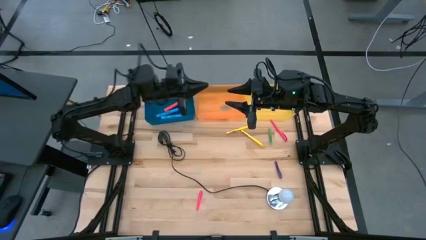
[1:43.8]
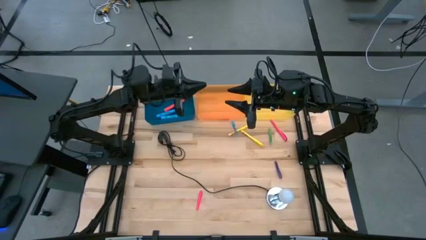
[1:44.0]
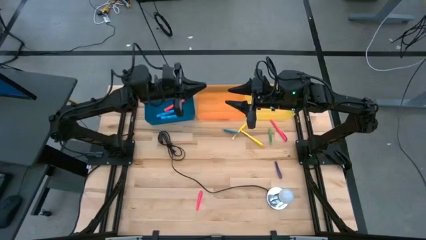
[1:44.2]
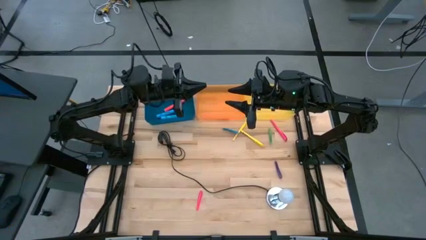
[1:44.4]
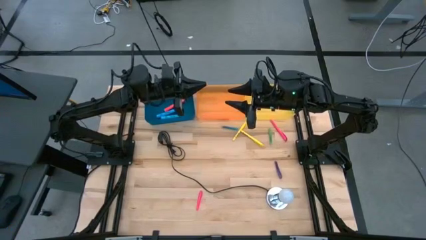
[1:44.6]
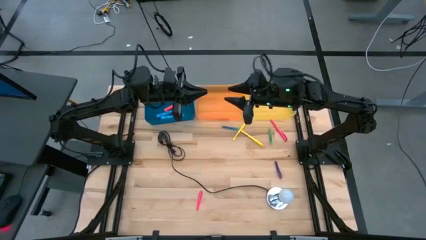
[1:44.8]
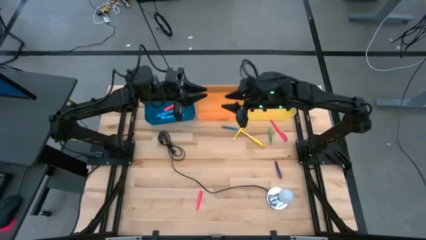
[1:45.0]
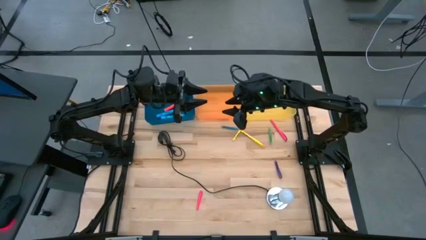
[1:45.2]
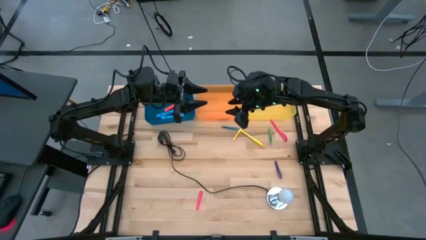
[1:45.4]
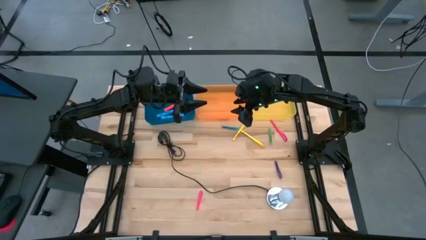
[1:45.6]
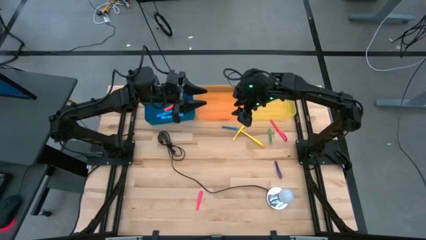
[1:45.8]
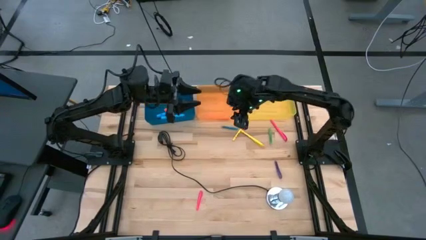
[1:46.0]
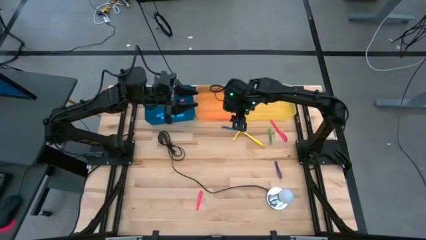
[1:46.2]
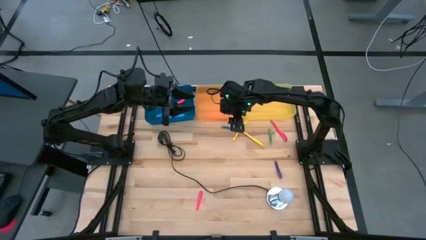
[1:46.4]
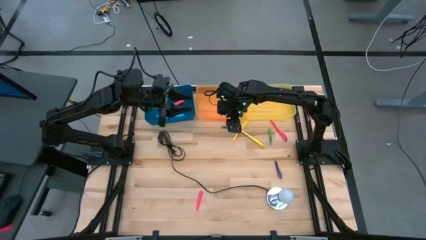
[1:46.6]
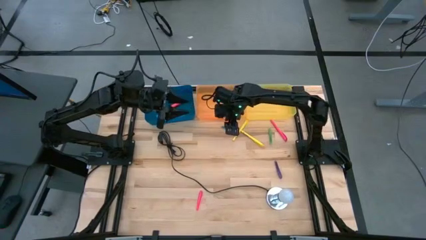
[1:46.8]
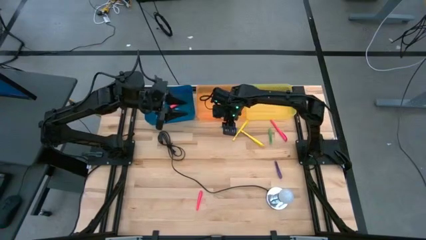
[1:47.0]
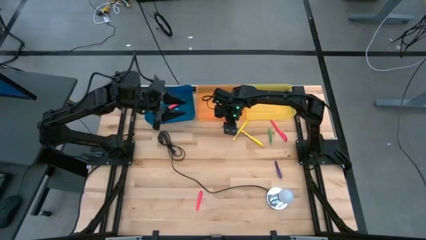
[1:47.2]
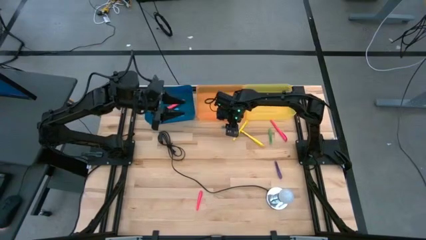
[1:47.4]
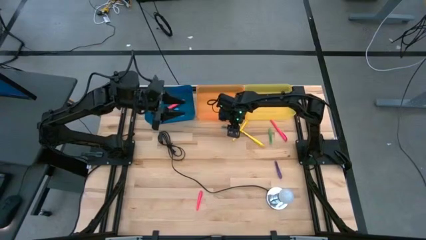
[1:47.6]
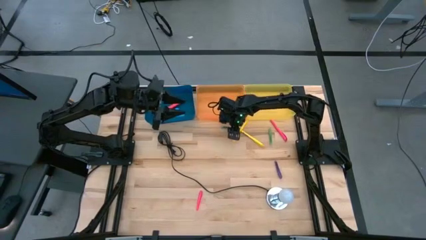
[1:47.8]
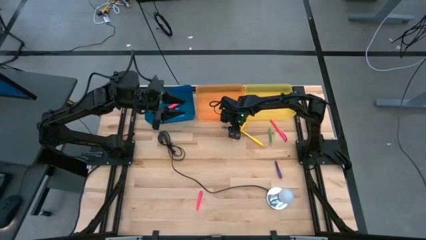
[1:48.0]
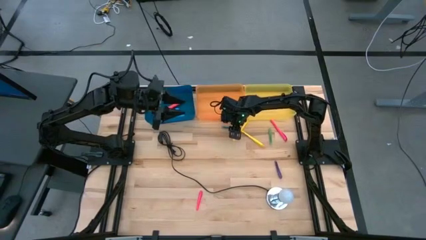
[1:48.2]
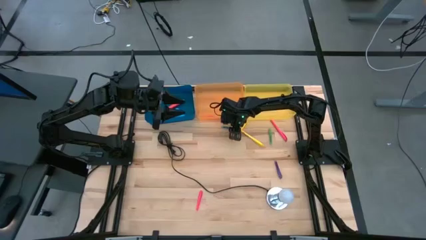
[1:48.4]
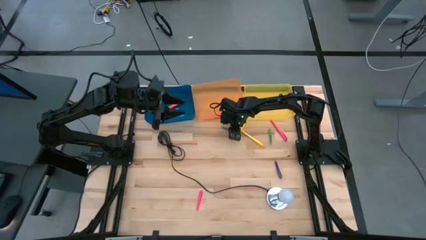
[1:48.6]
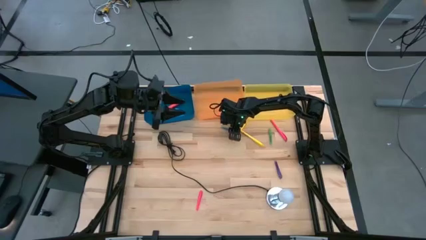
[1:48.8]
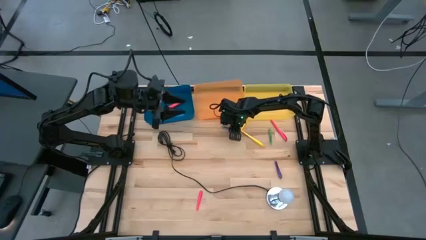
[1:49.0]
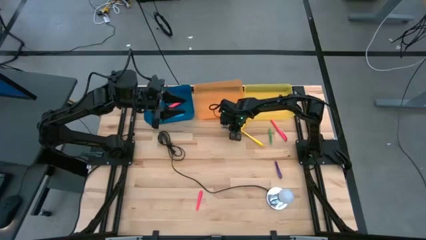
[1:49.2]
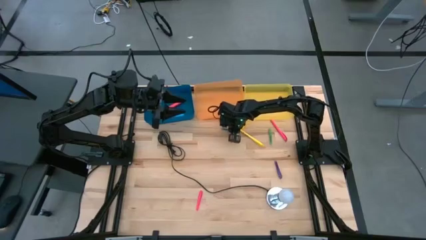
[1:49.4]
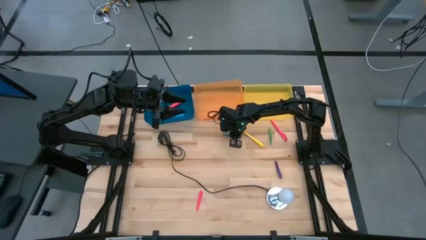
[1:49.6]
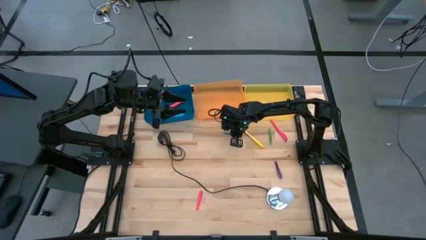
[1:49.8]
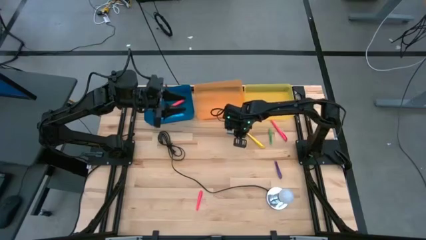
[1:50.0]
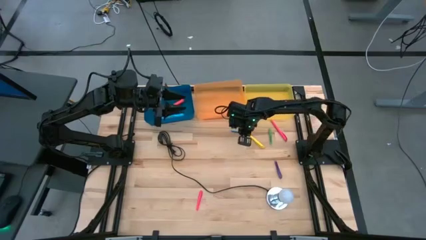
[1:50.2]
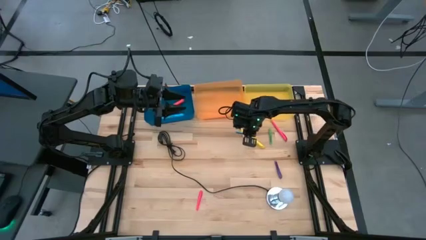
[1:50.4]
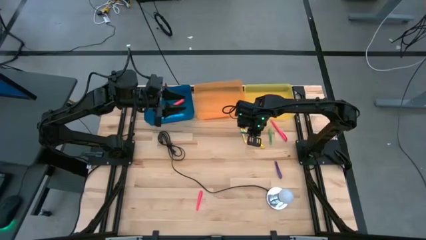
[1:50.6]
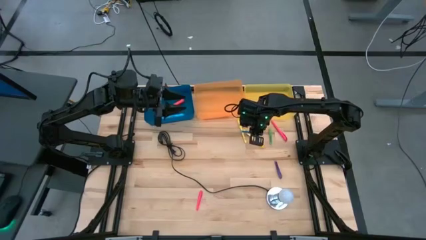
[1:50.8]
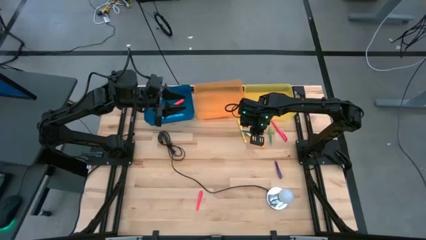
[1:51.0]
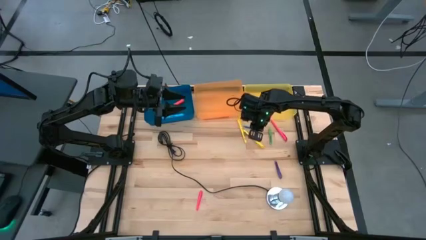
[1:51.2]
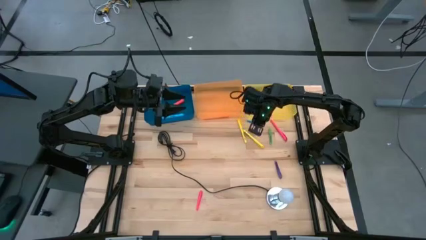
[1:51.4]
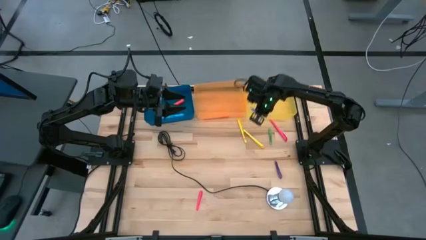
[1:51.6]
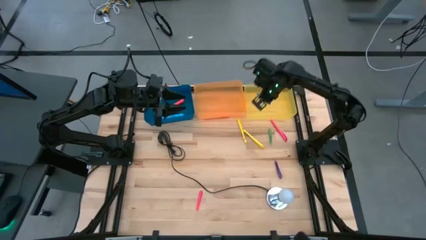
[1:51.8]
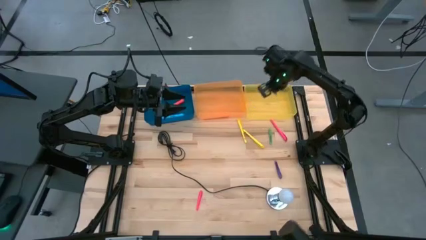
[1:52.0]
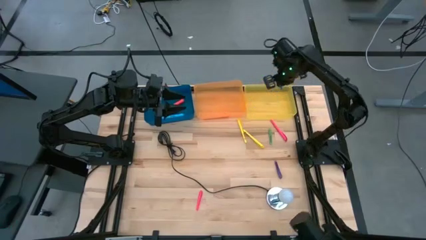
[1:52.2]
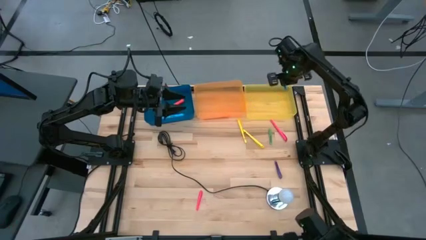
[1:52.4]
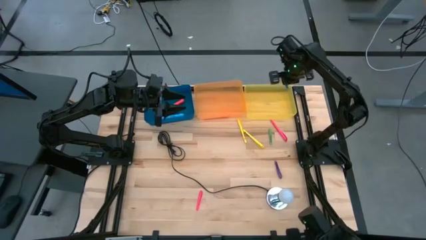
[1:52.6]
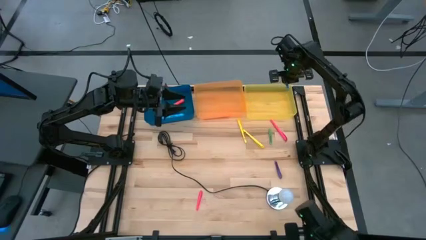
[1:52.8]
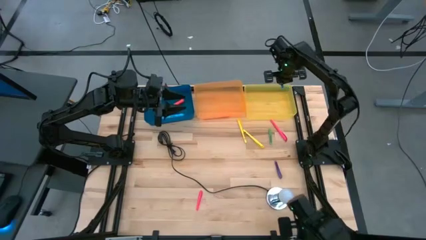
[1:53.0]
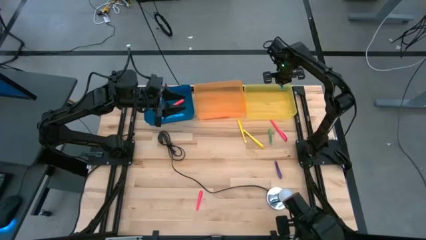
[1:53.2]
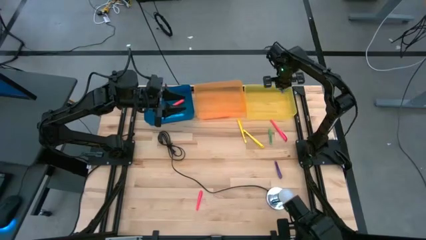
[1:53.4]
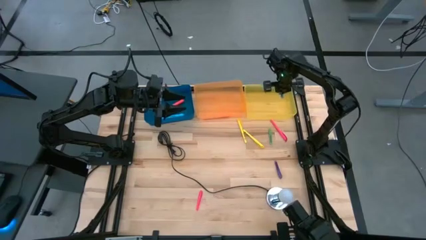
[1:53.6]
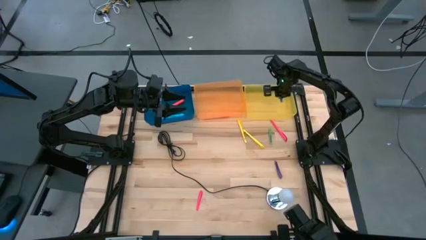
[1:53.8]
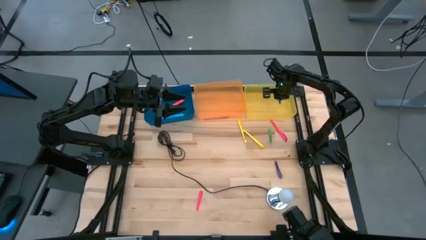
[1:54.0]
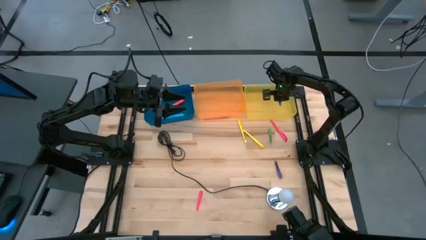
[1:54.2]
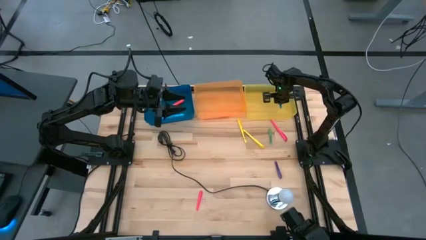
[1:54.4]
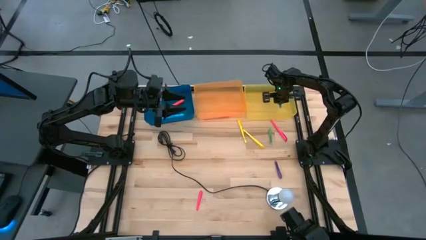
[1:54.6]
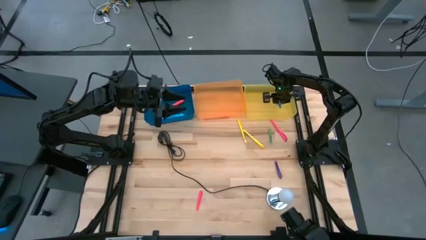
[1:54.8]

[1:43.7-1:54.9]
Task: Pick & Place Markers
Put the small blue pen into the yellow bin

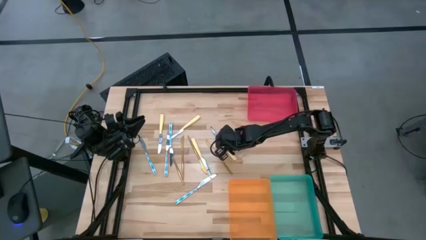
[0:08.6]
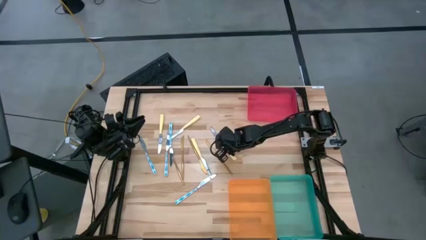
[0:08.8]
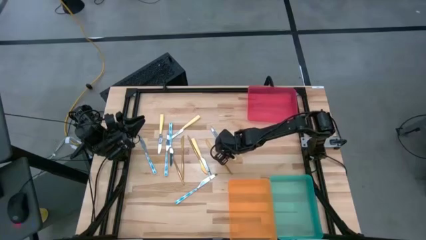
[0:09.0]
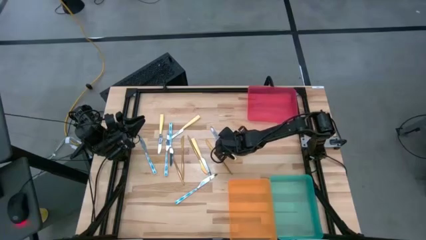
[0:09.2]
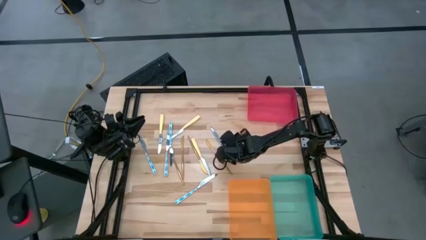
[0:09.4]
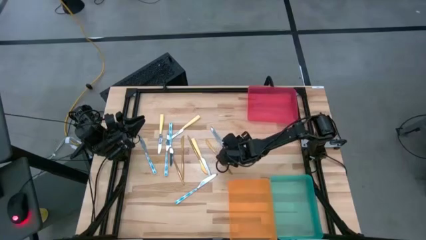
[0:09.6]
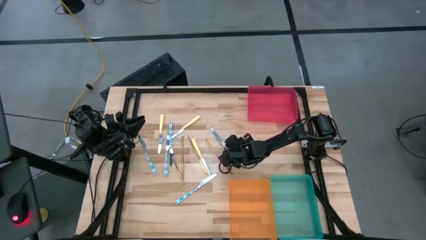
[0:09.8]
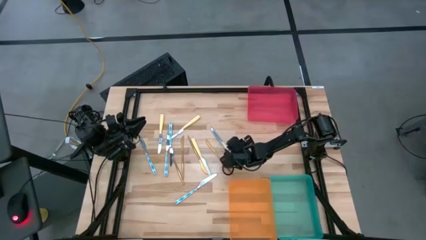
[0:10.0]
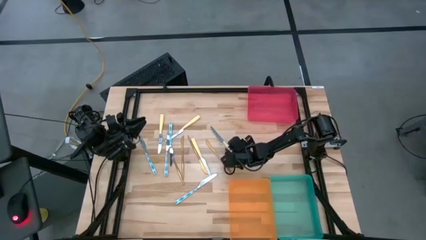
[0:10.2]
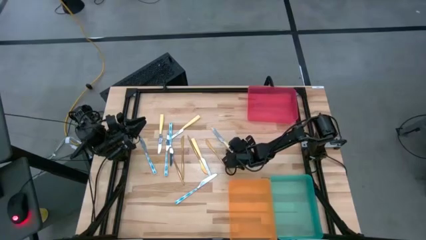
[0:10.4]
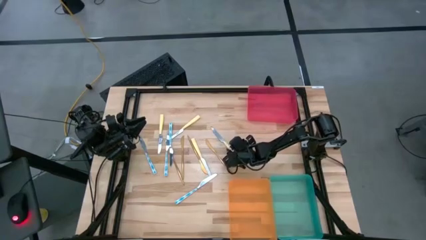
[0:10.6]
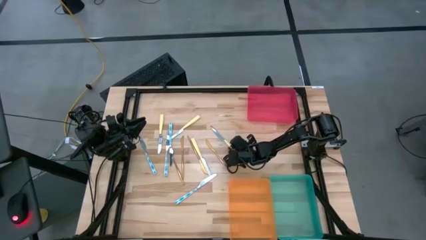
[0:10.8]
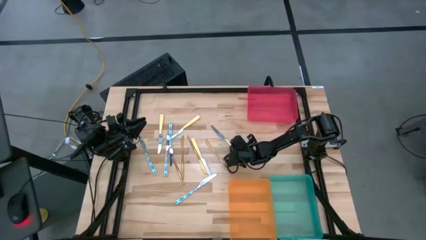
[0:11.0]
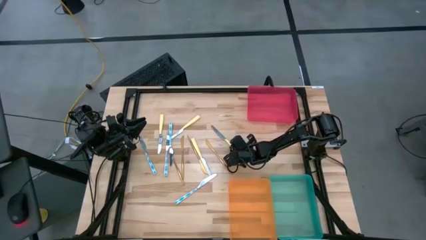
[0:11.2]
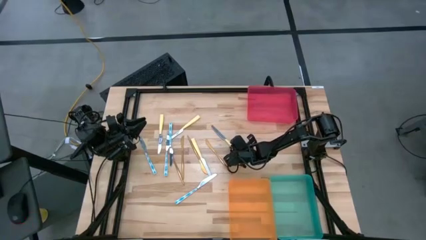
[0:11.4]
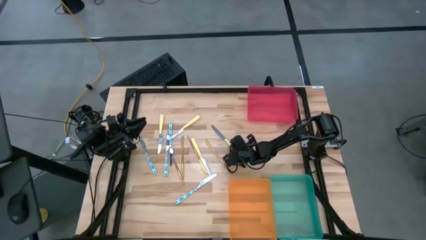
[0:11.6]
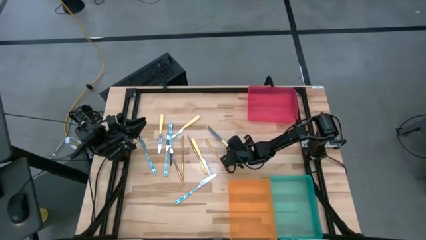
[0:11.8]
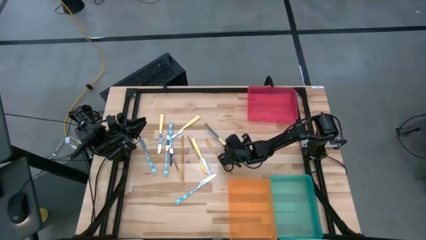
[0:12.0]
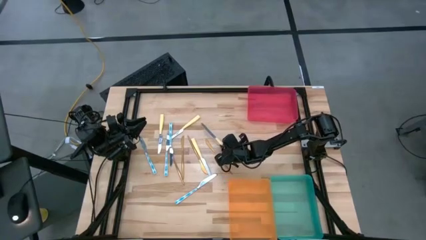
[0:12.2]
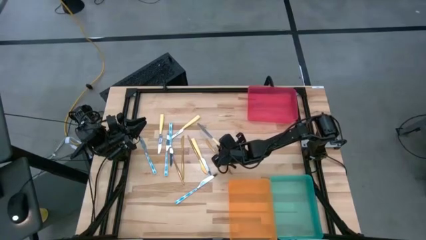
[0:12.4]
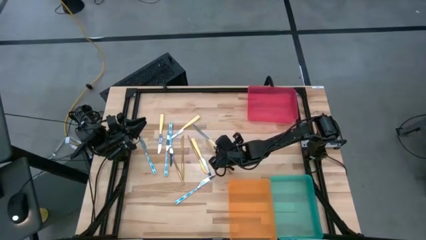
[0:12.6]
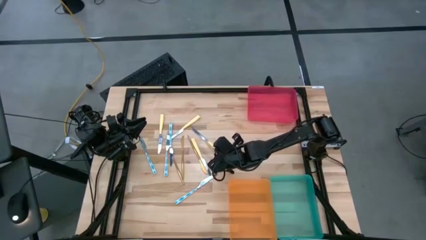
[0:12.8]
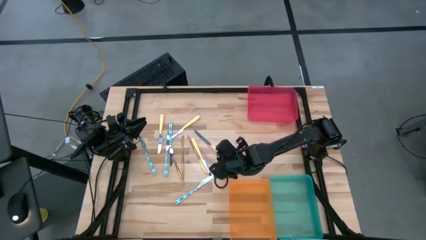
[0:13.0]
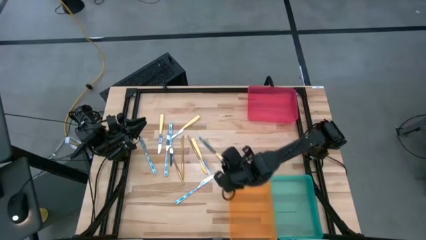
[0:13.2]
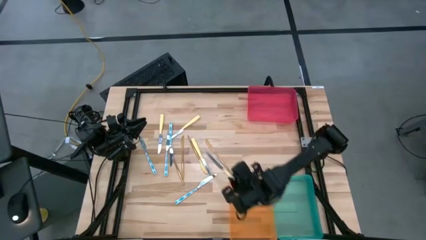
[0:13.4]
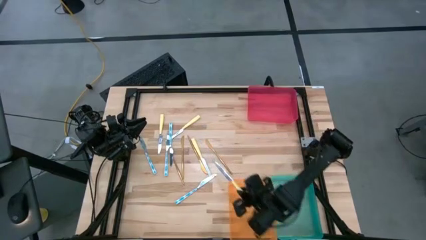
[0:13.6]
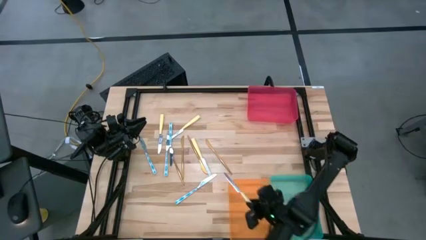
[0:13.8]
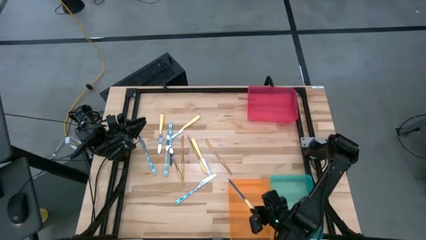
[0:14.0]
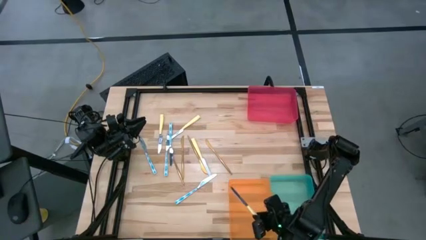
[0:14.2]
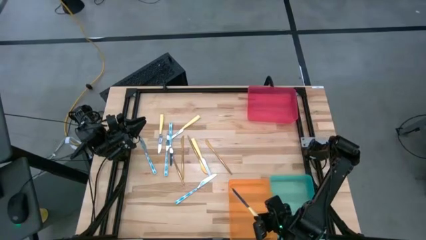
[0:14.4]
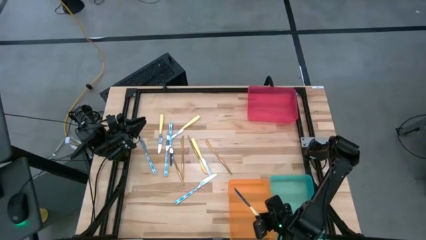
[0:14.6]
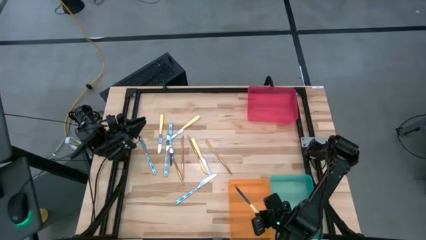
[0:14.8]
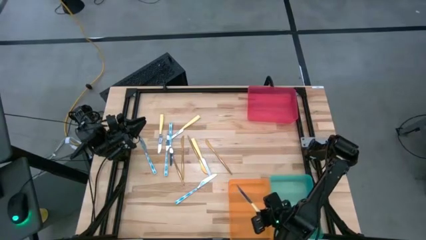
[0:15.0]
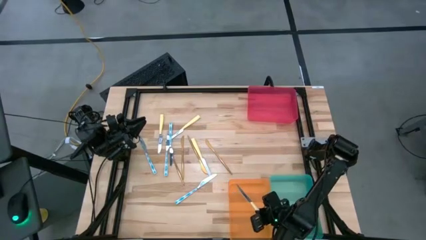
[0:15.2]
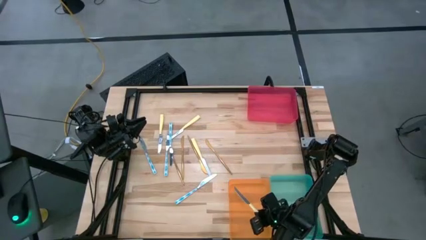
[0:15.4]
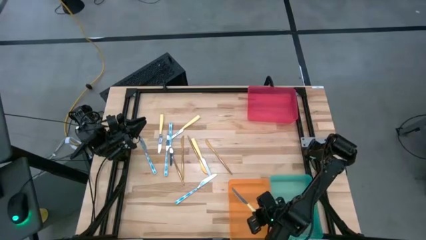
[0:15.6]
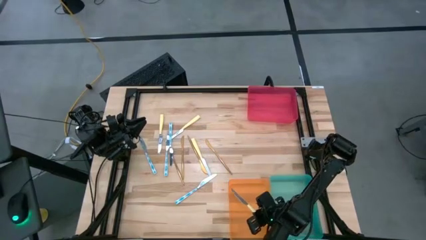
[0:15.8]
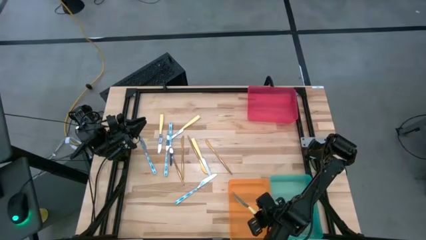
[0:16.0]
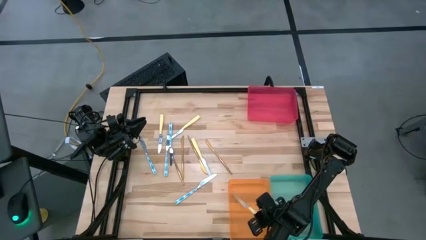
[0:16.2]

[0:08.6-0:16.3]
Task: Sort silverware by color (type)
Put the yellow knife into the orange bin
